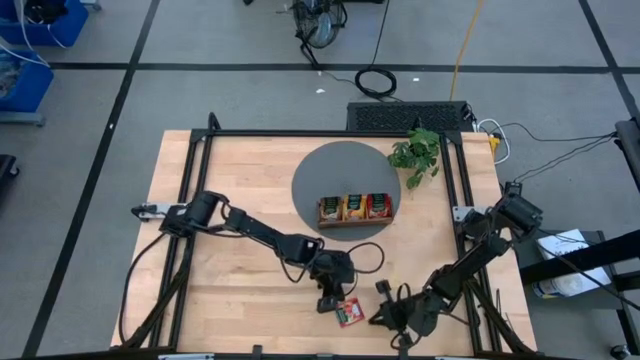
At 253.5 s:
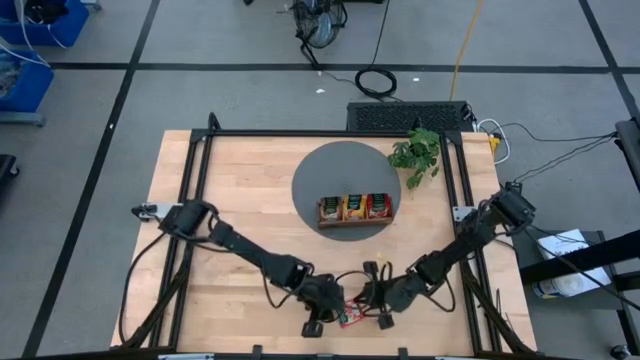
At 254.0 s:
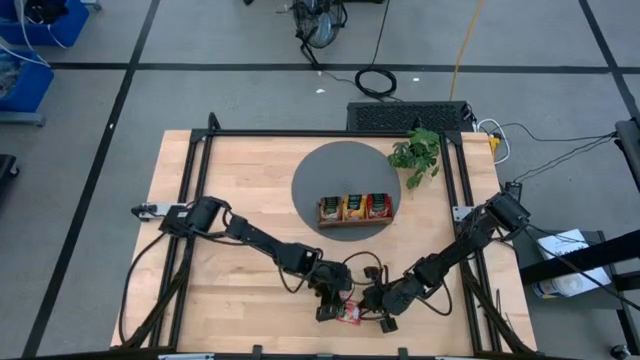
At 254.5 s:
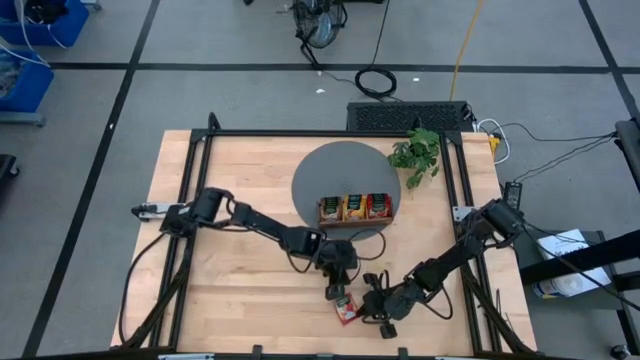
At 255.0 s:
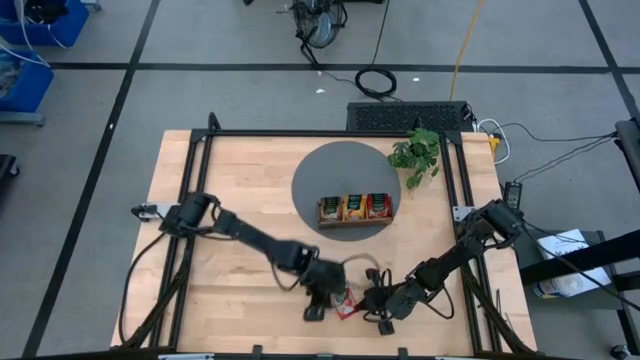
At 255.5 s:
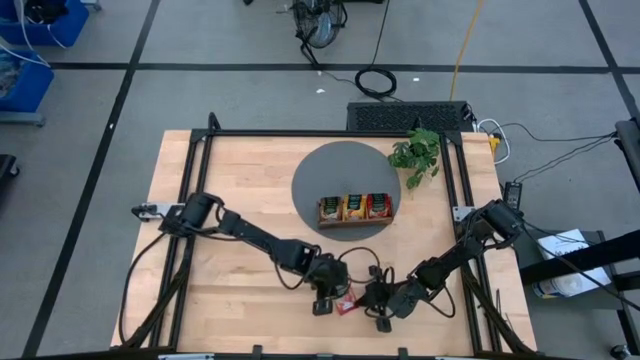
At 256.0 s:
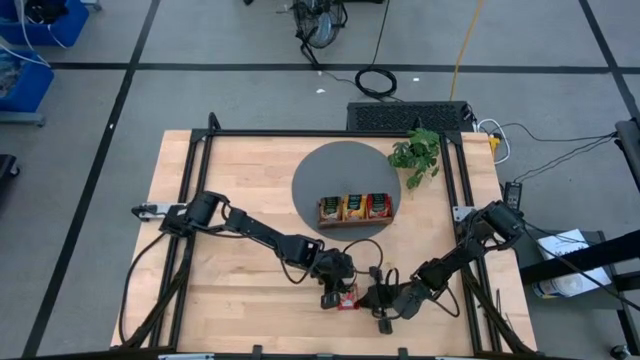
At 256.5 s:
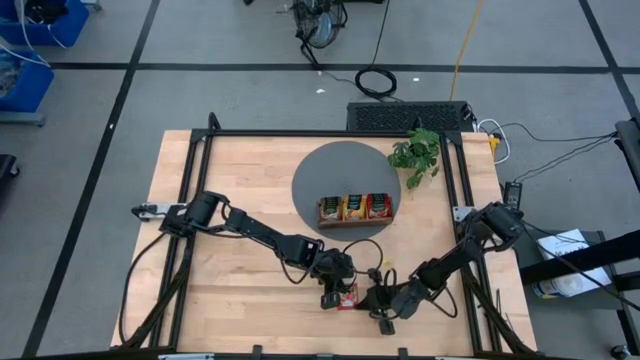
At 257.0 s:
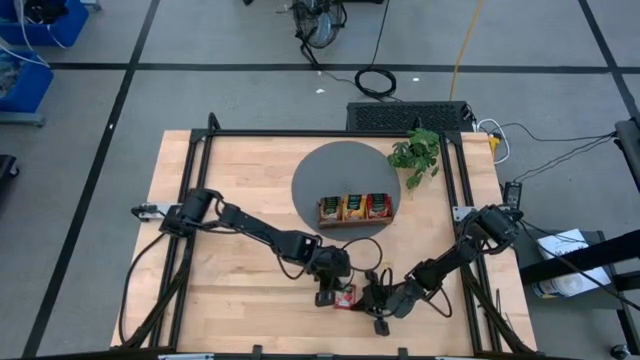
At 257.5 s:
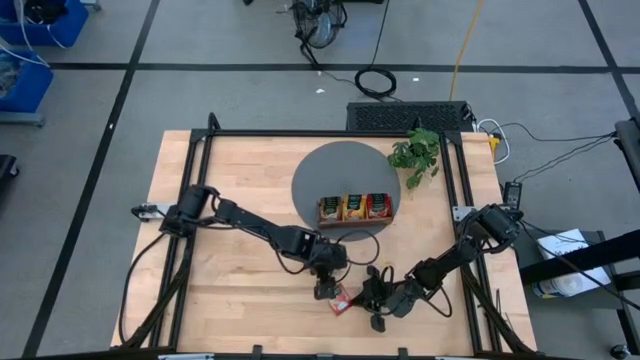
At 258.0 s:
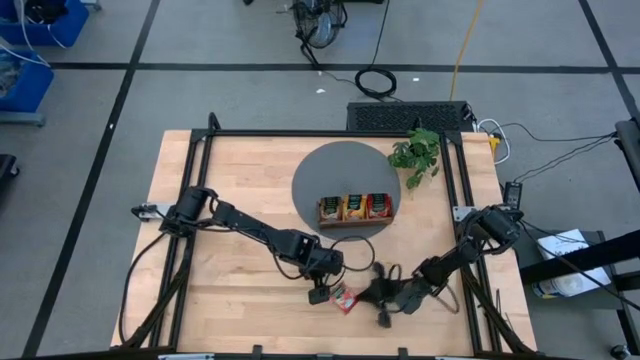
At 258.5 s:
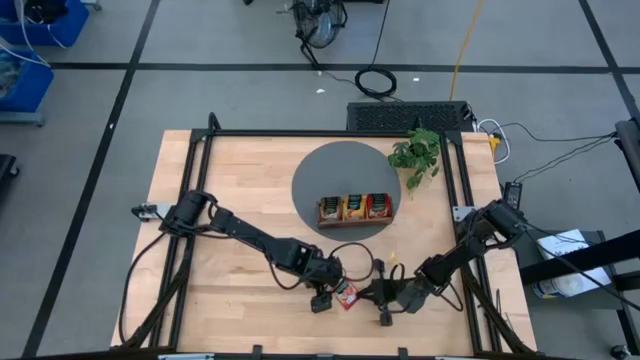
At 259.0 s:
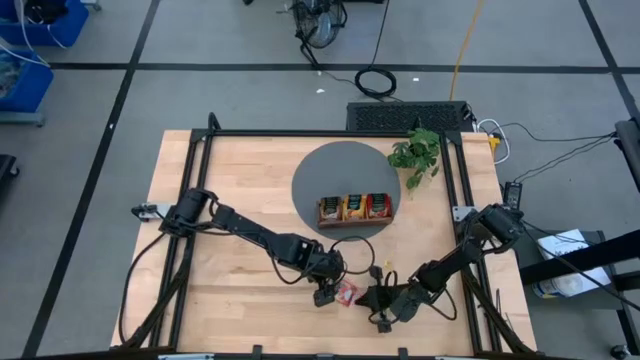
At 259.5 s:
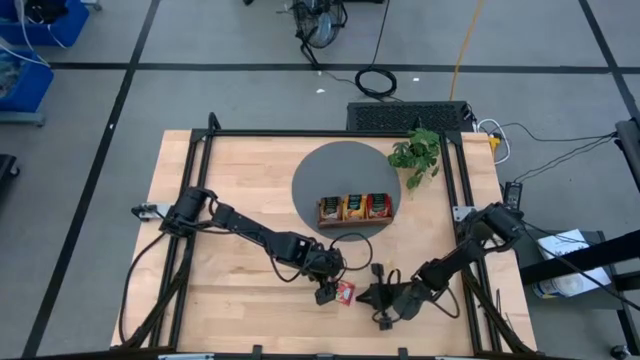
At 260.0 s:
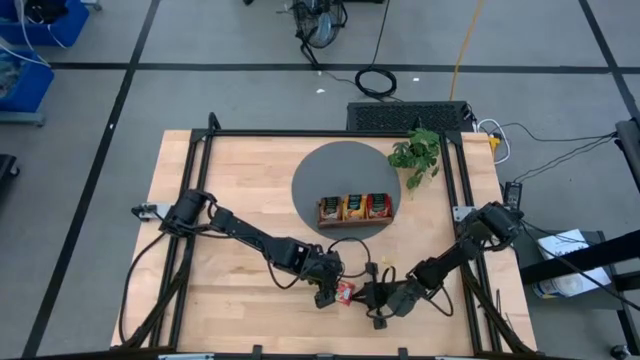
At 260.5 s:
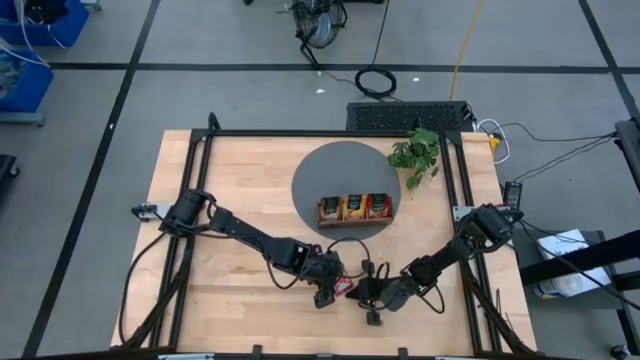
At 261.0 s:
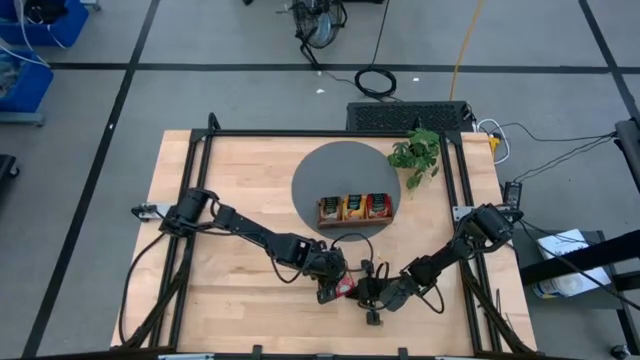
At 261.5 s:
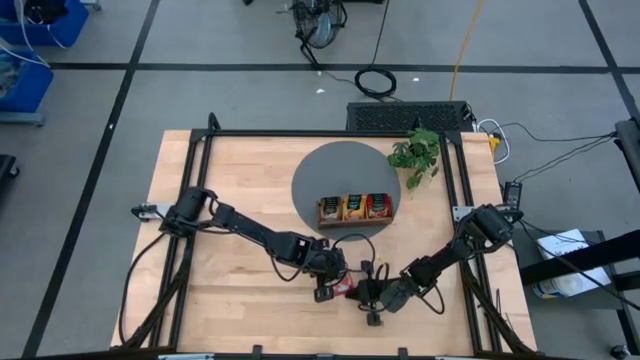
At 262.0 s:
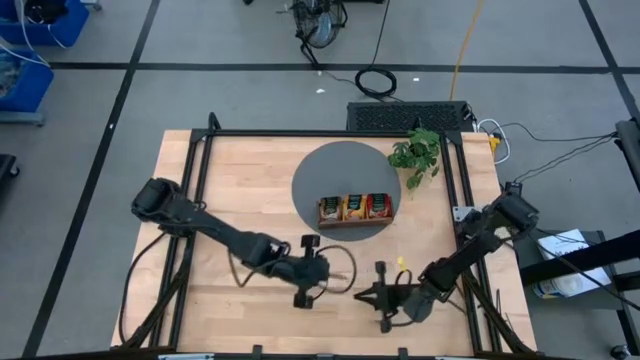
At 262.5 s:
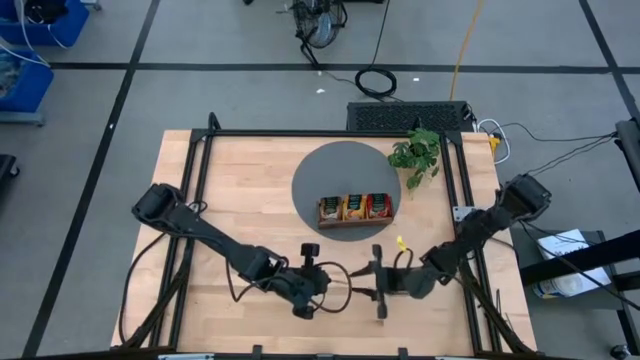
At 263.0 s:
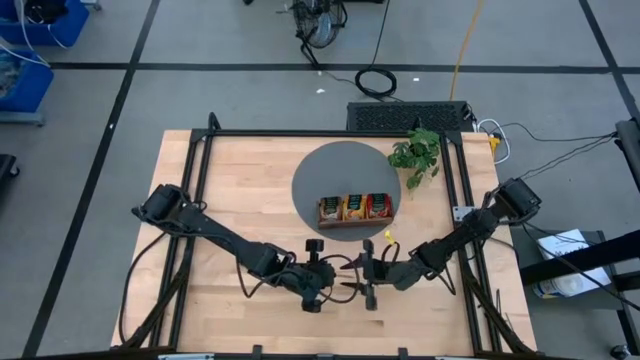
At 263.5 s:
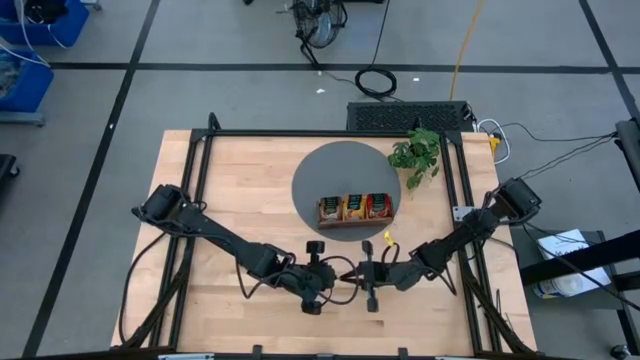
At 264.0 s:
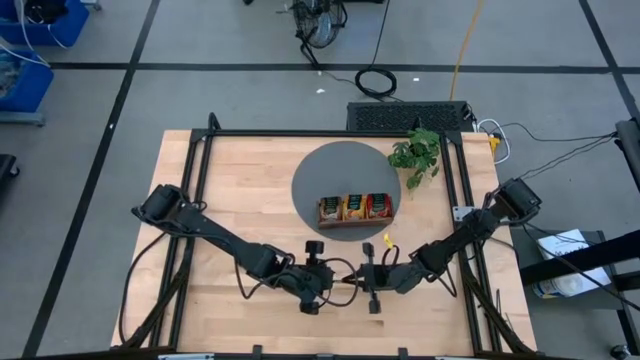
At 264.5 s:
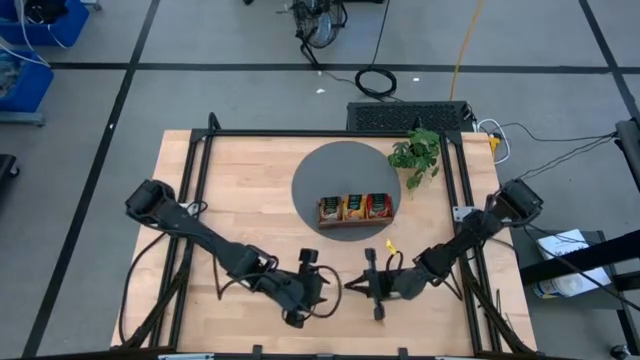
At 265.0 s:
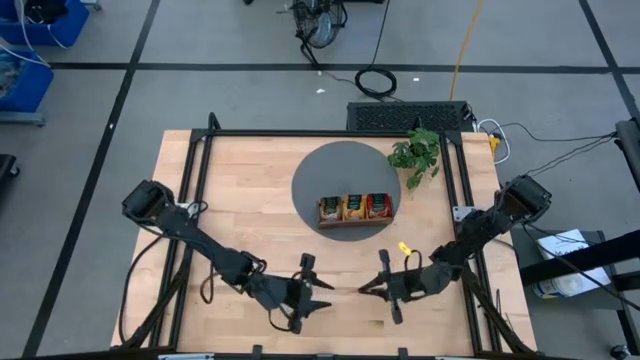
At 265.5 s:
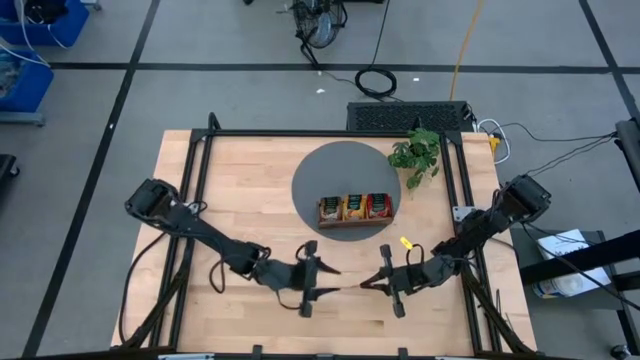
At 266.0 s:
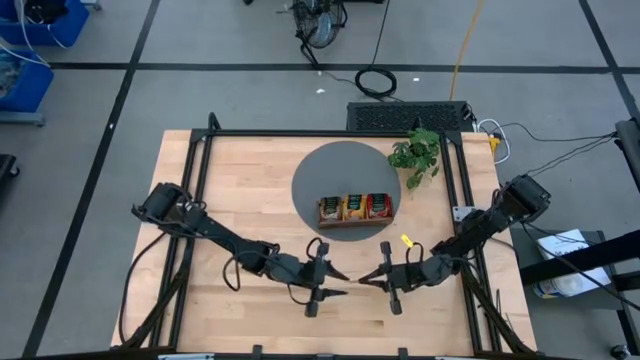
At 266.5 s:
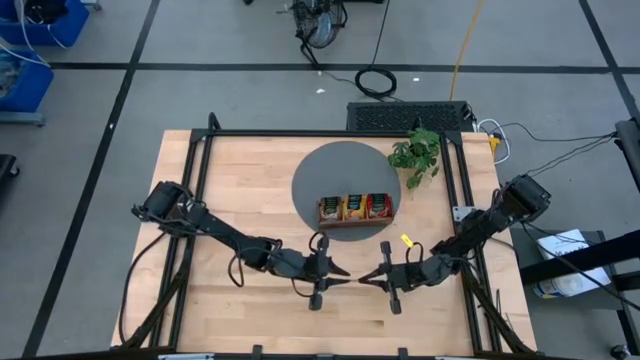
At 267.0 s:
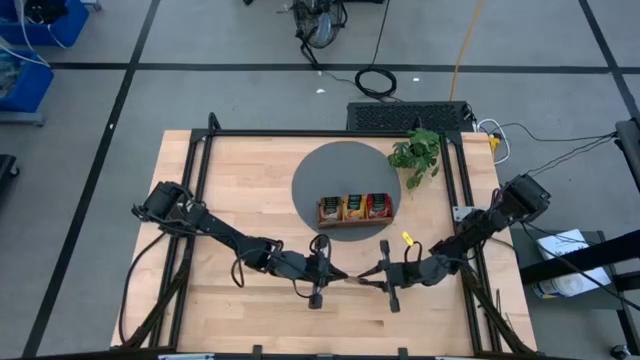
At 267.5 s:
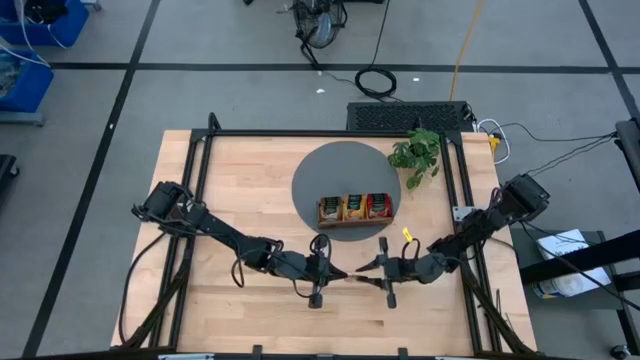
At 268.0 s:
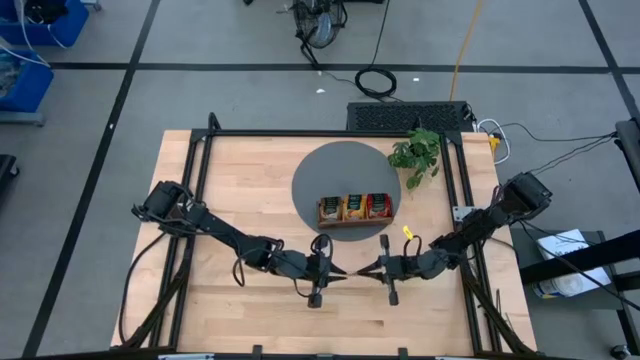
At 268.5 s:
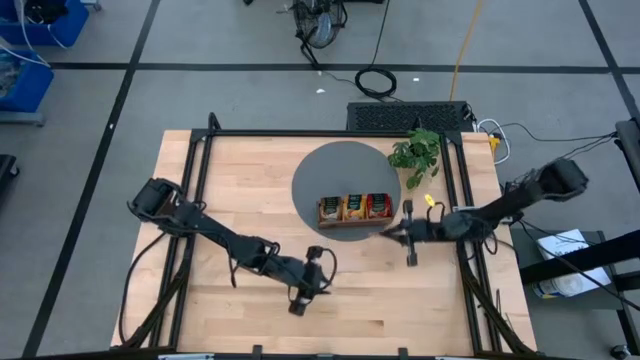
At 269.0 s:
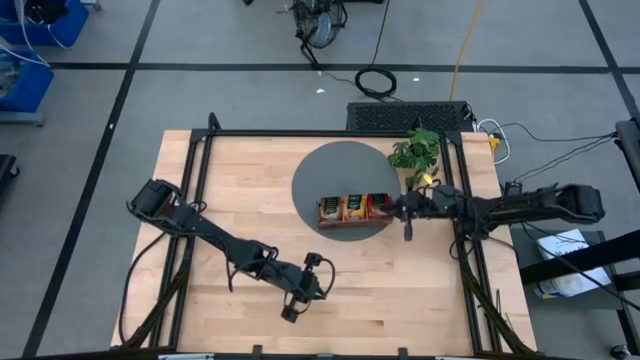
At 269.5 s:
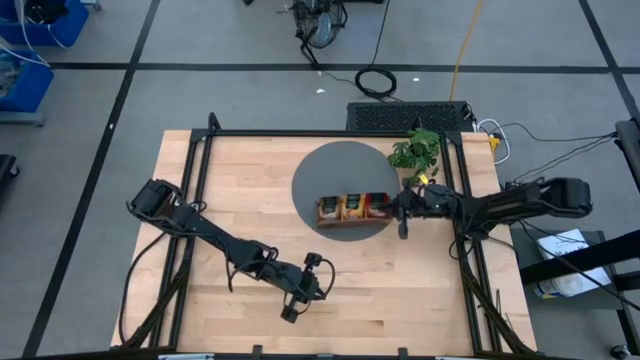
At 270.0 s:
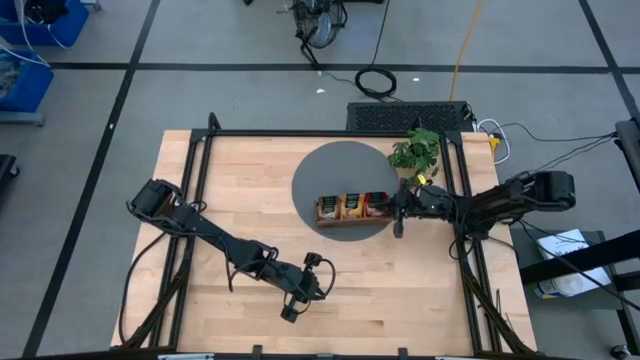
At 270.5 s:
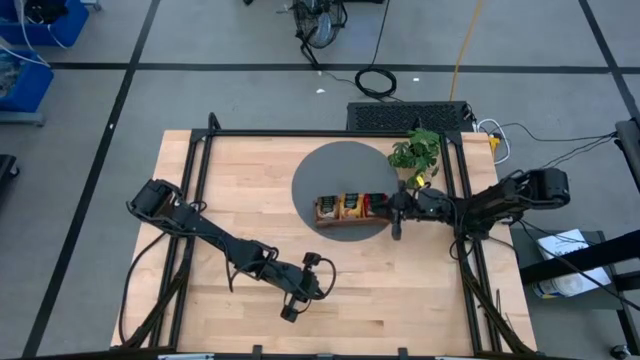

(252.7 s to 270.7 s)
Task: Pick & Place Tea
Put the red tea bag into the right section of the wooden organizer

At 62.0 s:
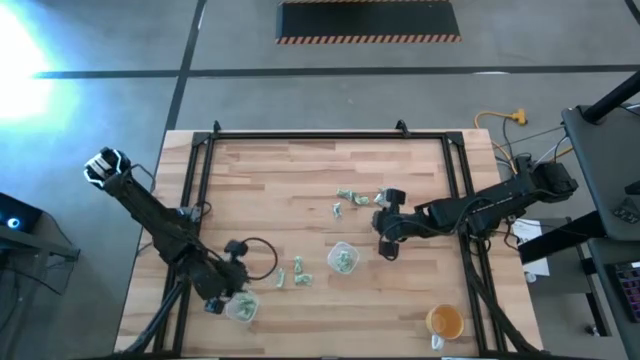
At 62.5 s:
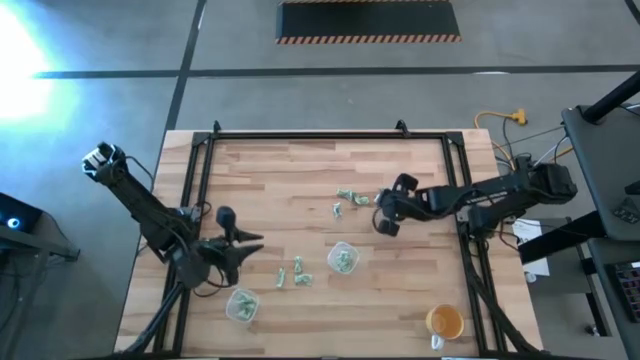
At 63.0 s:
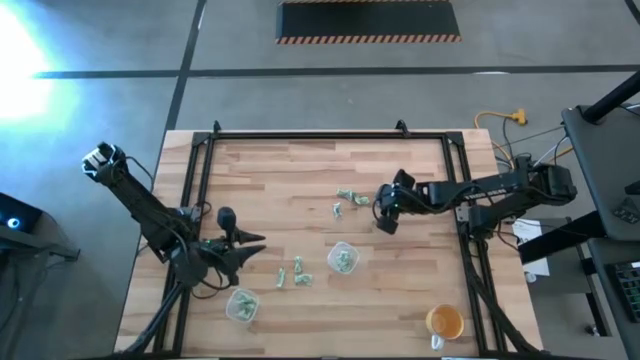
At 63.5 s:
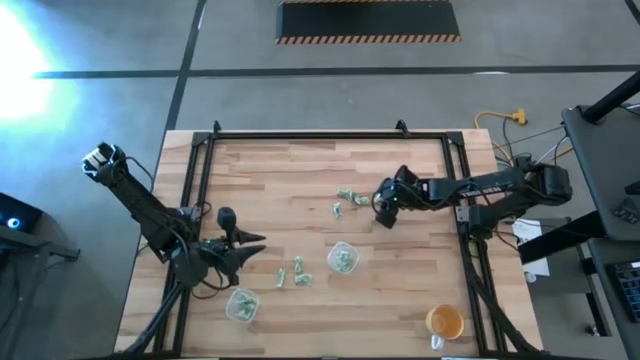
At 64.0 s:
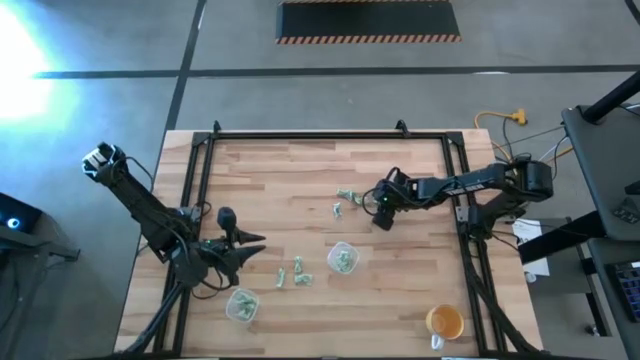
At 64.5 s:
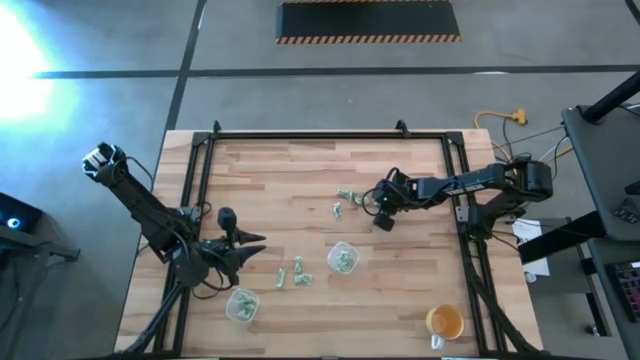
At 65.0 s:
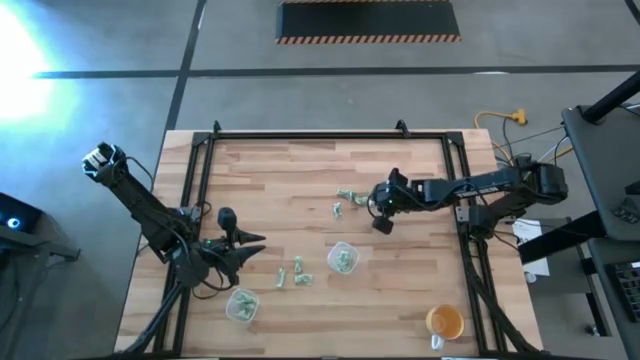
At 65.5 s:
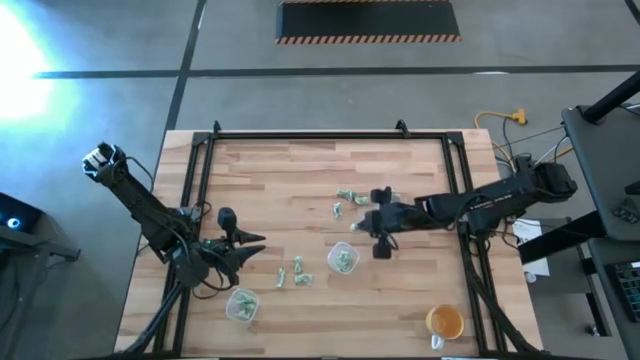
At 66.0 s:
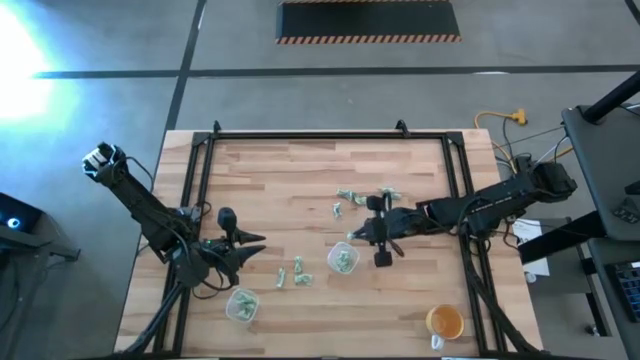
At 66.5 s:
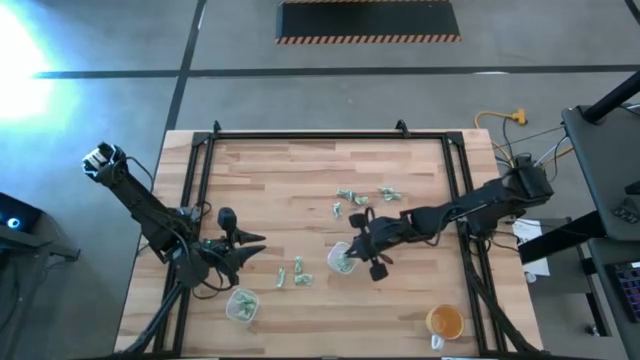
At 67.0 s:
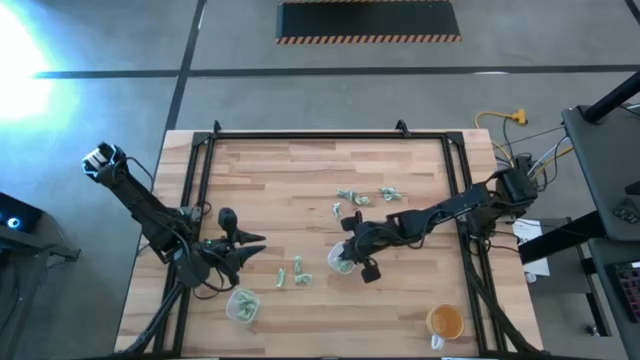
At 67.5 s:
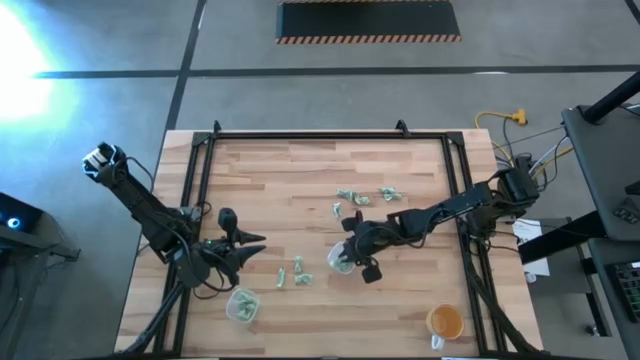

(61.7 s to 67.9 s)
Task: Pick and place items into bin
Put the light green packet into the top transparent bin
